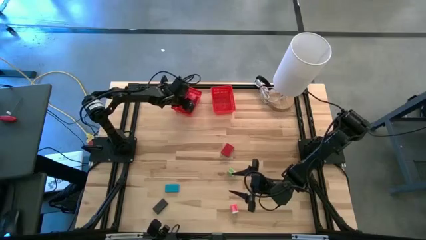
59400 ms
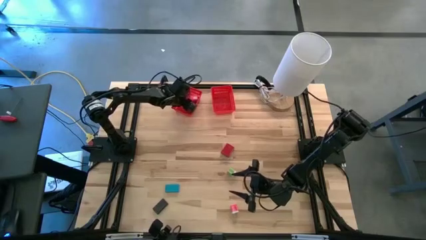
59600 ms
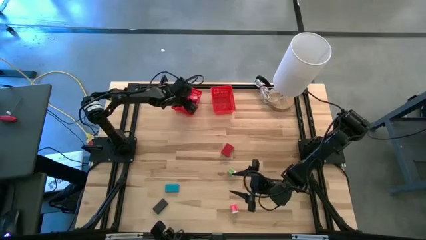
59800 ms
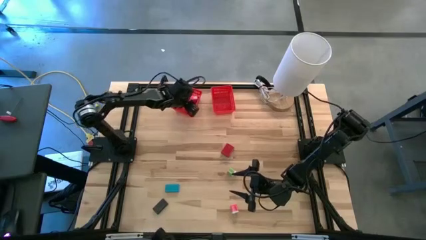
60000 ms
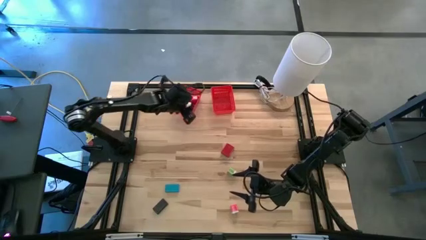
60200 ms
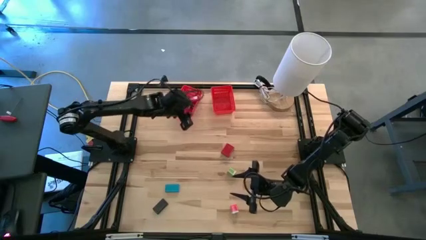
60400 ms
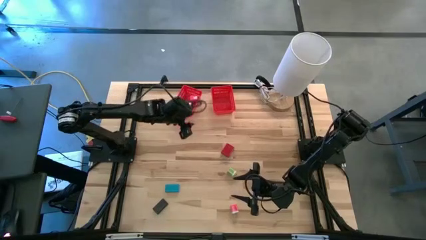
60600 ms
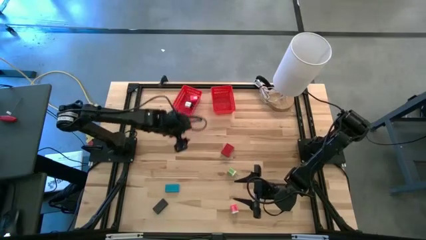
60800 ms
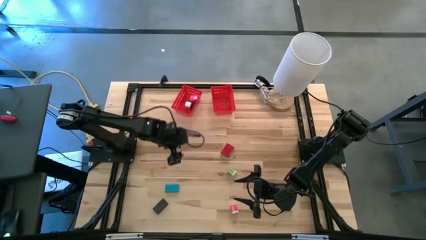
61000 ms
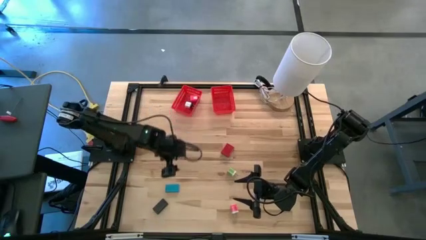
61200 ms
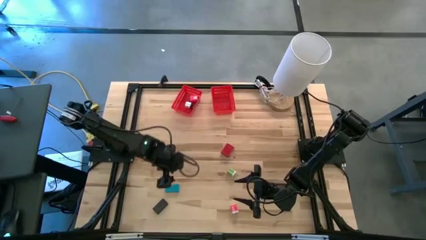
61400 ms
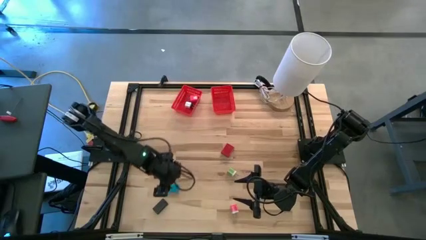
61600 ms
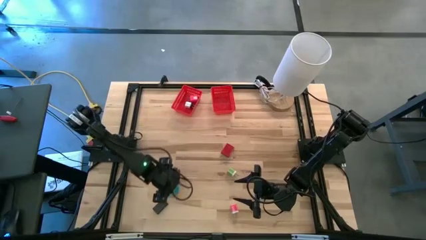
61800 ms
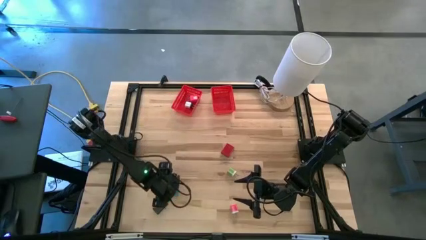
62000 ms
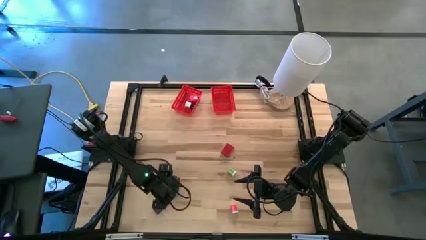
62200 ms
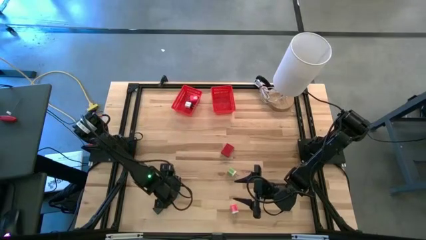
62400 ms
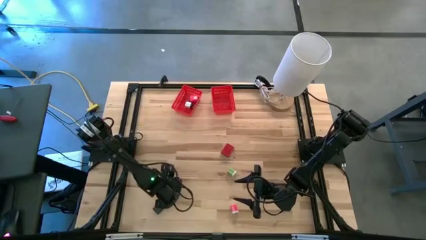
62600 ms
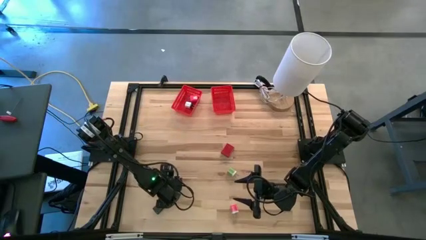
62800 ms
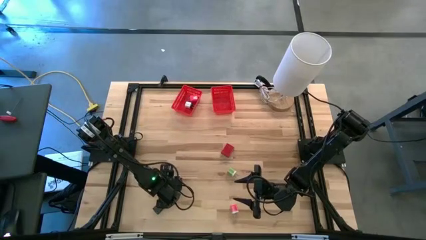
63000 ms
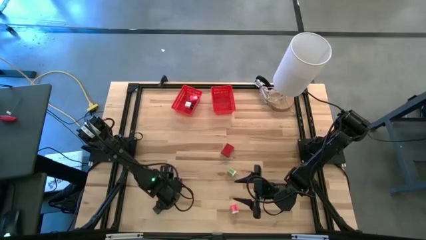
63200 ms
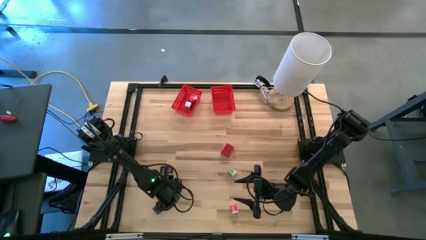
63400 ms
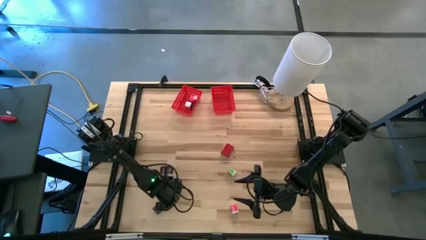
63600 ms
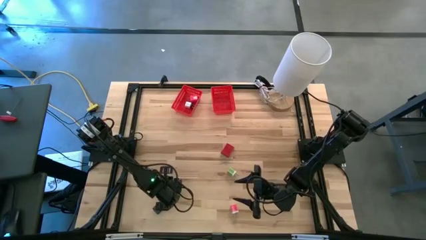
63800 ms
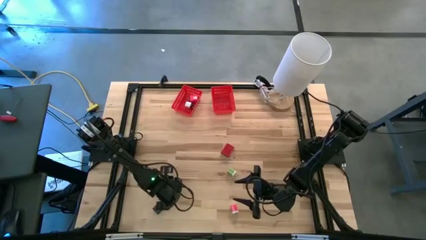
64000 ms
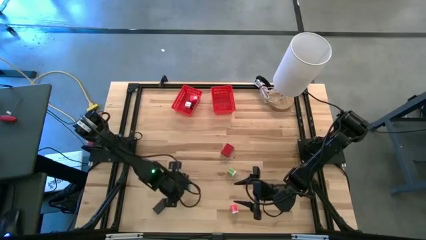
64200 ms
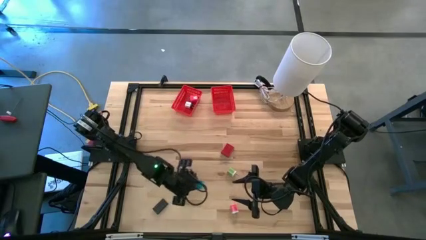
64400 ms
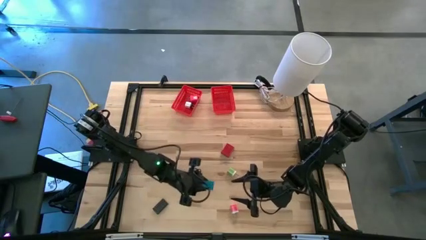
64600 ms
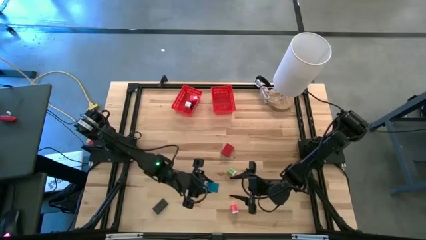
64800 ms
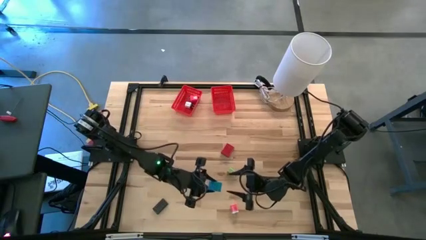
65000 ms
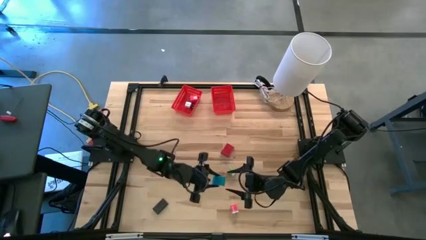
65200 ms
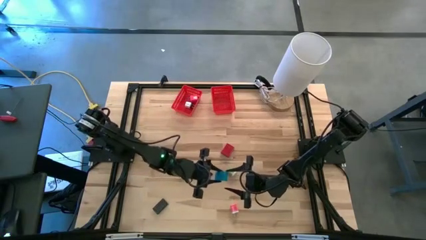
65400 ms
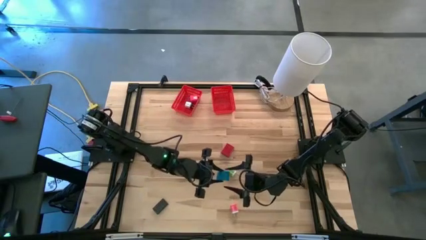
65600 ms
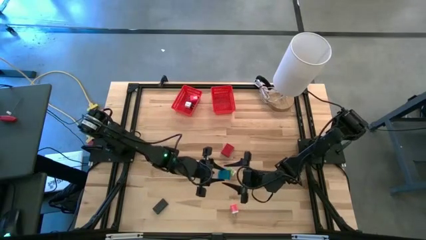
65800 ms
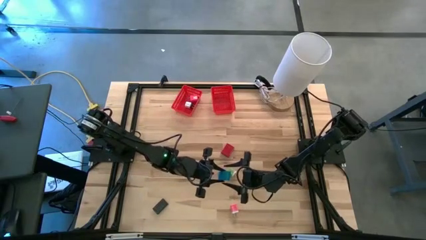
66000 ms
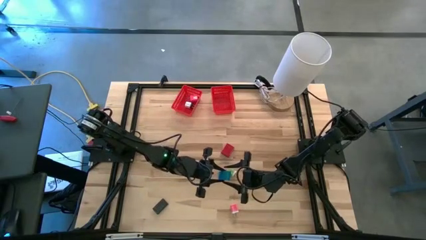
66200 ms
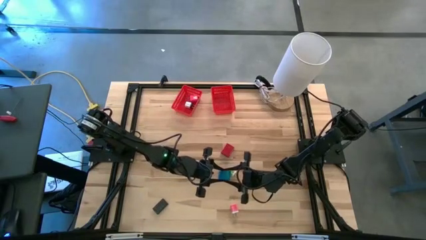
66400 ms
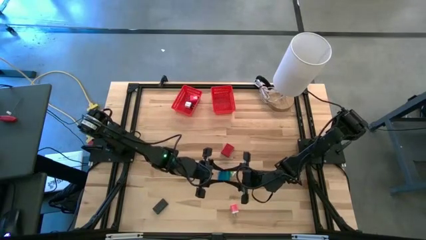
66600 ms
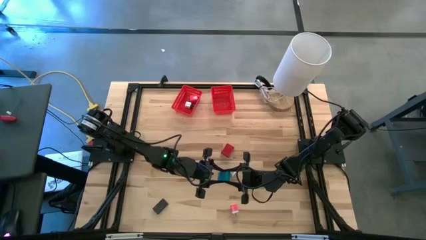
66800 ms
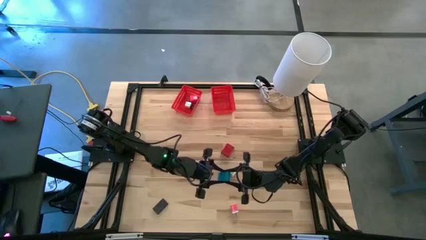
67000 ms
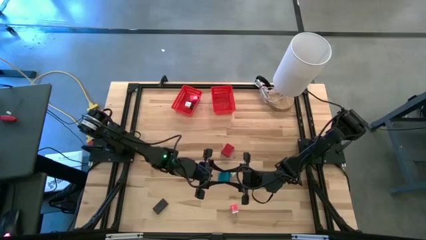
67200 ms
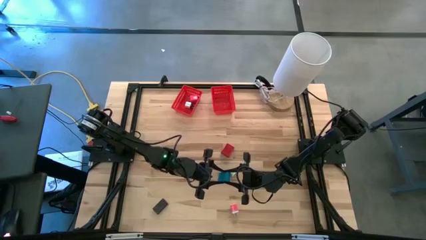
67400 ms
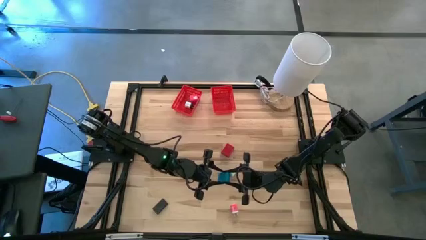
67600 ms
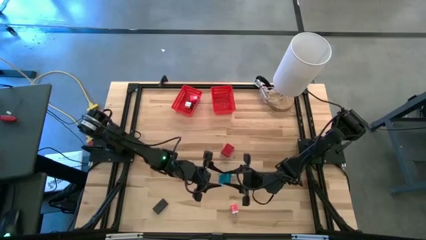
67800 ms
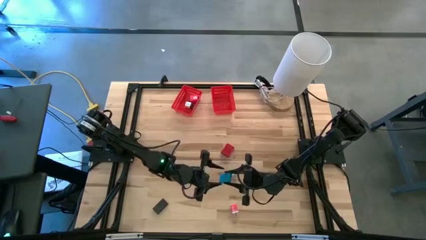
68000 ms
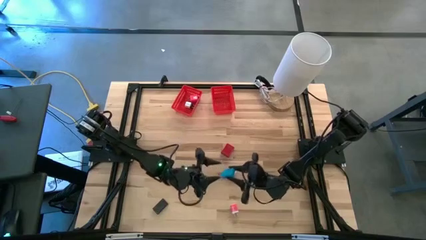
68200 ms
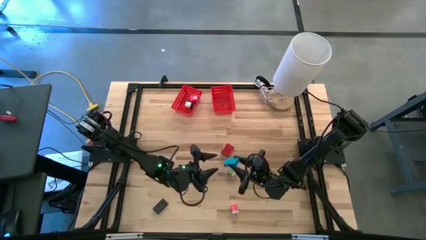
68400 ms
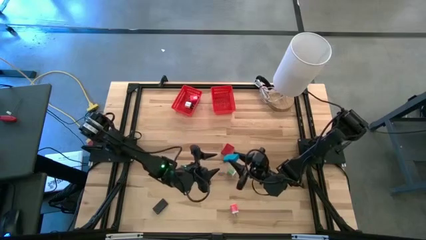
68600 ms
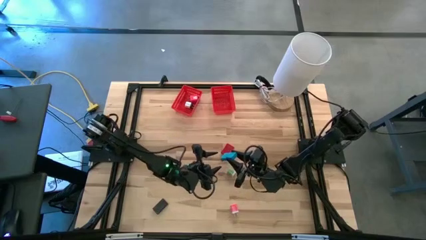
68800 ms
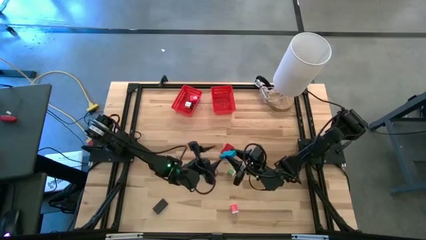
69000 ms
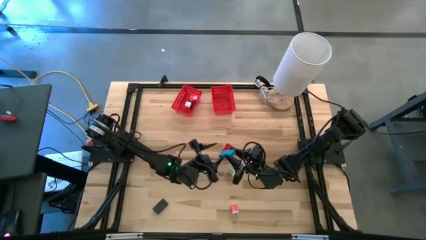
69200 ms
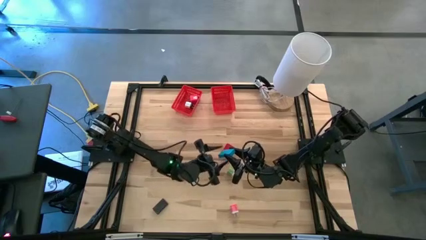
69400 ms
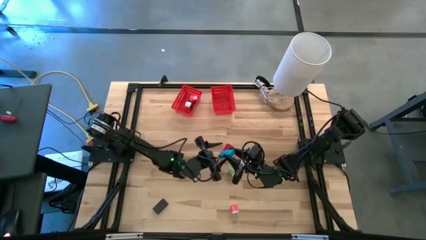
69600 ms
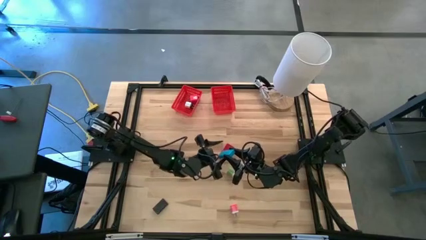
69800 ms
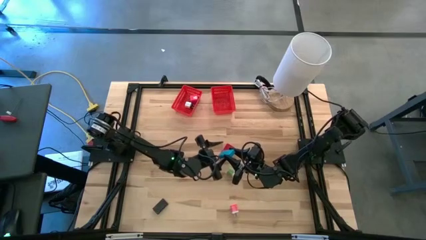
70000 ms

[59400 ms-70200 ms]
Task: Pick & Place Office items
Put the blue digital clock into the right red bin
